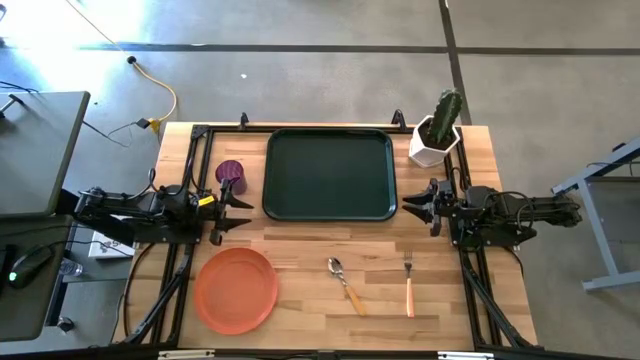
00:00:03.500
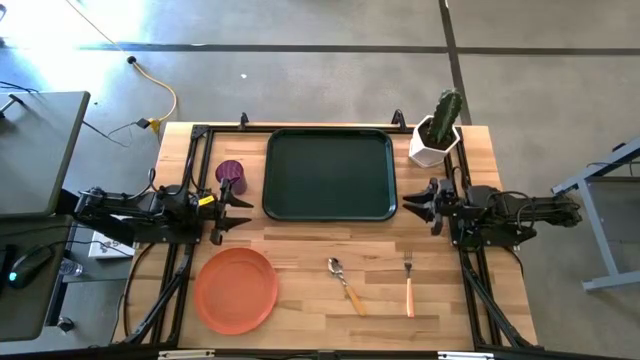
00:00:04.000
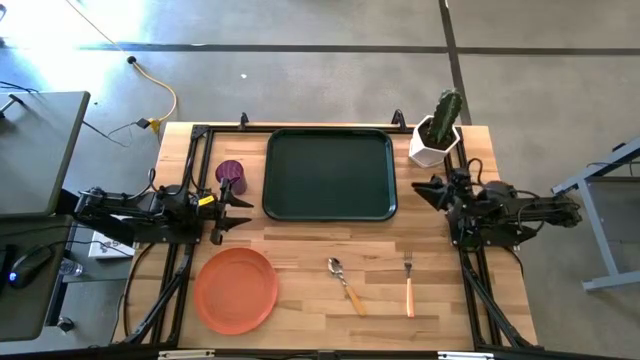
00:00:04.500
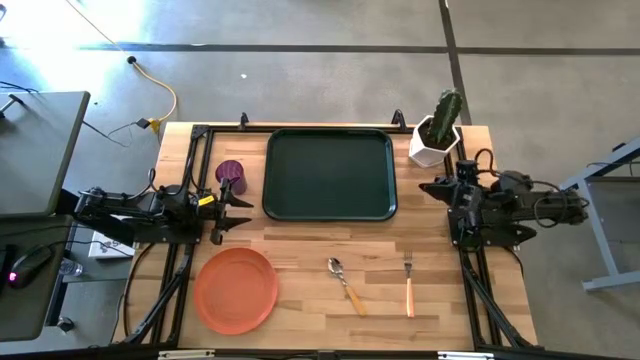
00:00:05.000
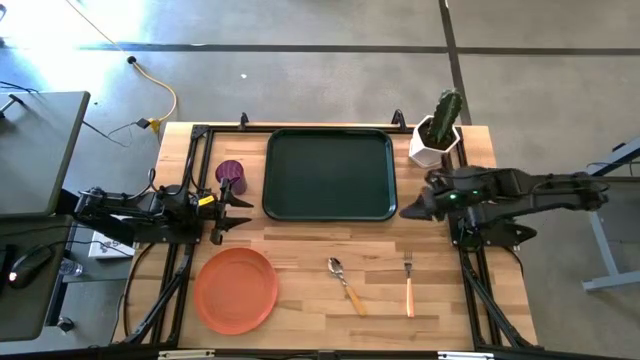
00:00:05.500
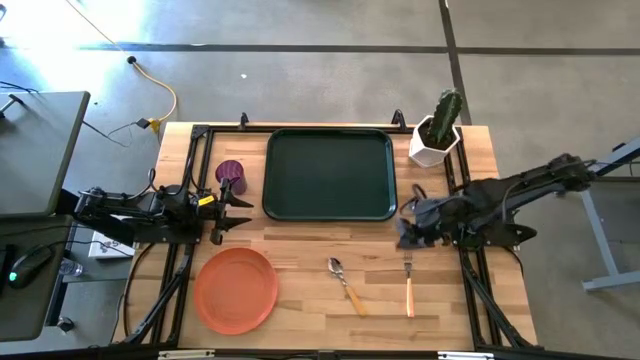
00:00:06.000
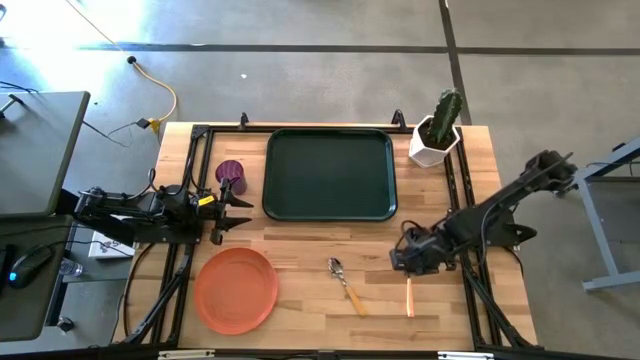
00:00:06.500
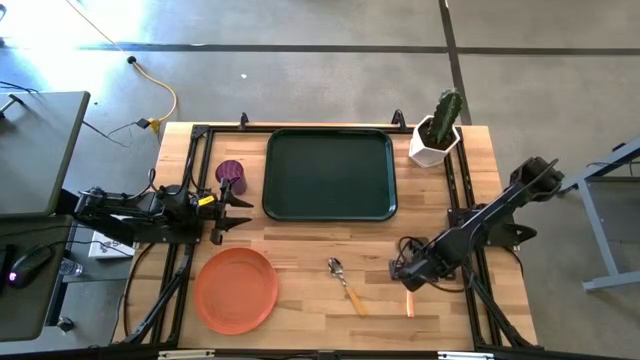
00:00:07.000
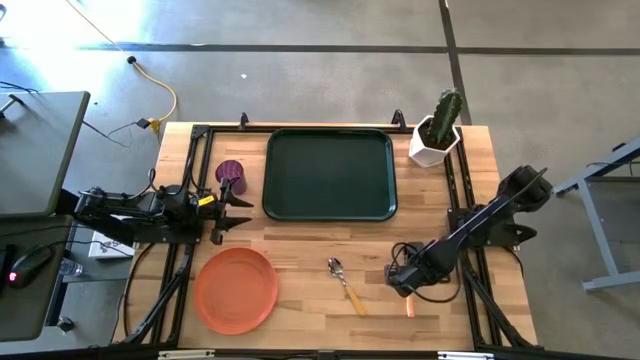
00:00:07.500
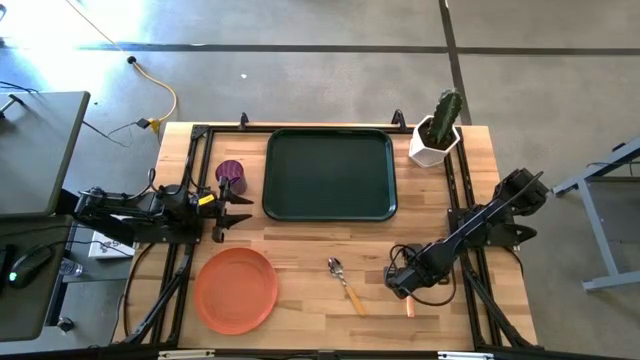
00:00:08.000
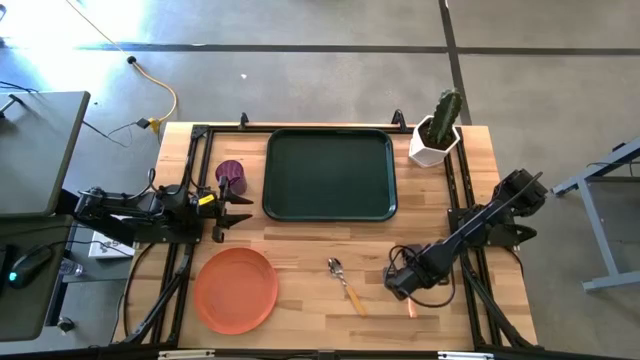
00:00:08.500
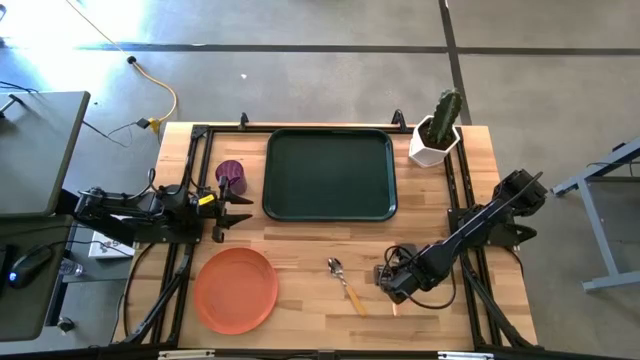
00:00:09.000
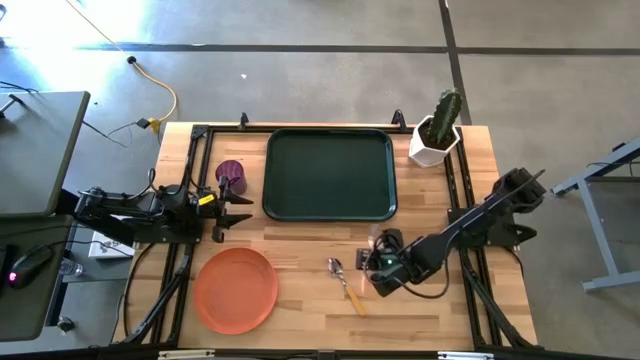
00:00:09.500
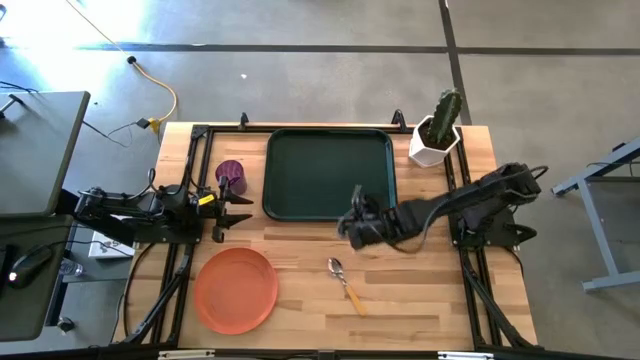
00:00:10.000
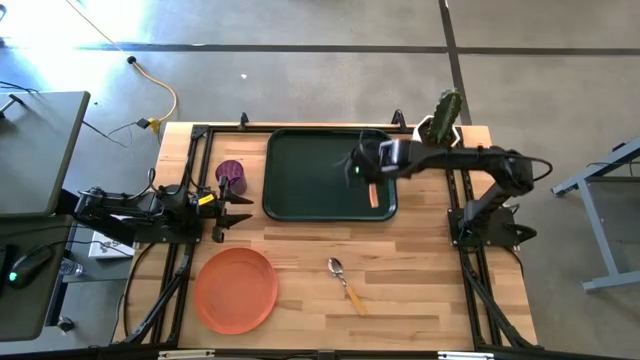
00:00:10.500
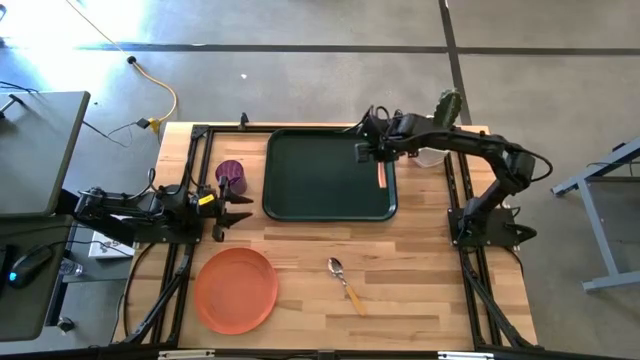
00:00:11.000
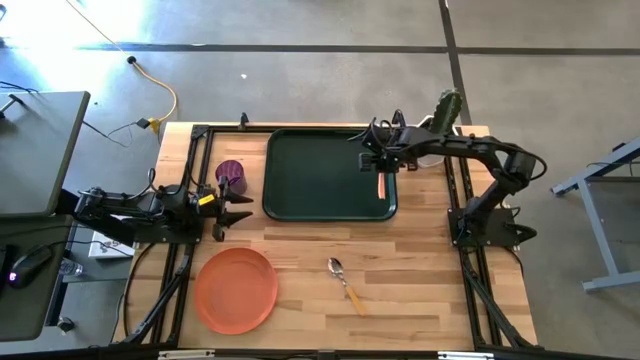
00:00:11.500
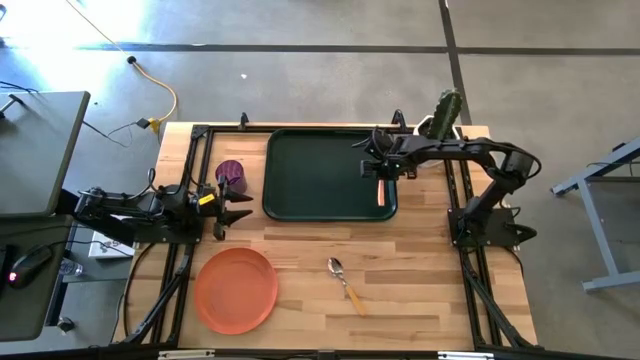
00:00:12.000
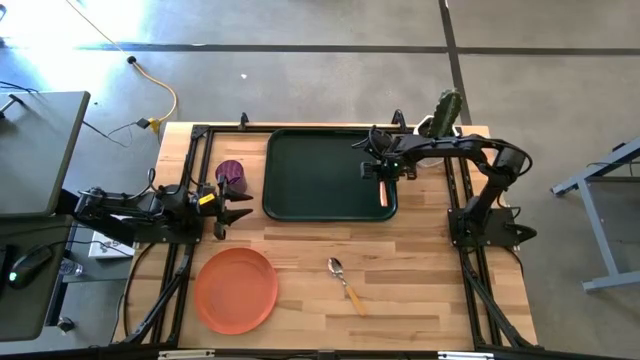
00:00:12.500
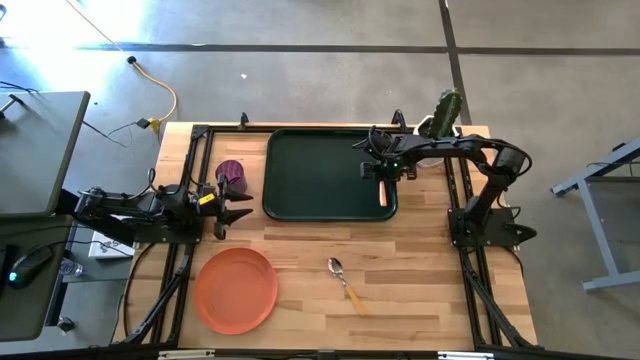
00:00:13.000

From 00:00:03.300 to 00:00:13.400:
Task: Pick and place plate/cup/fork/spoon on tray
Put the orange fork on the serving tray

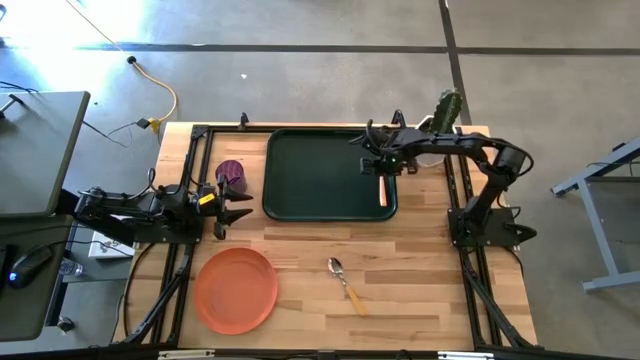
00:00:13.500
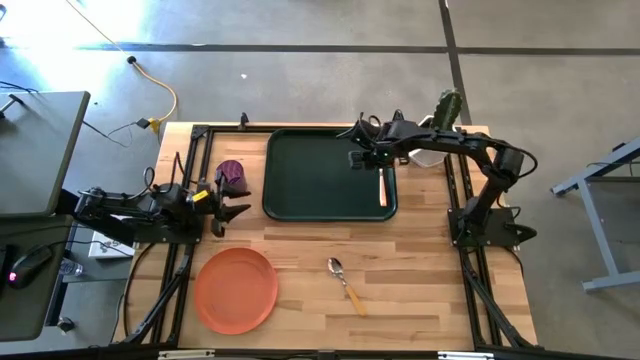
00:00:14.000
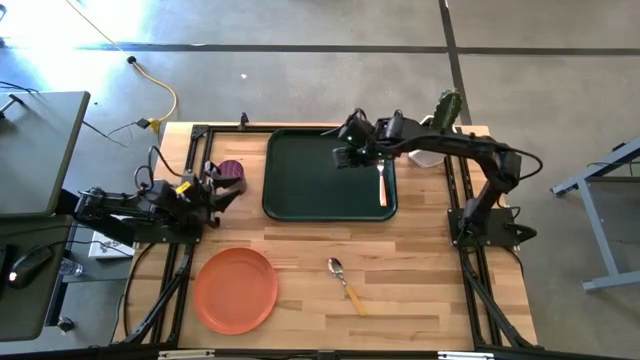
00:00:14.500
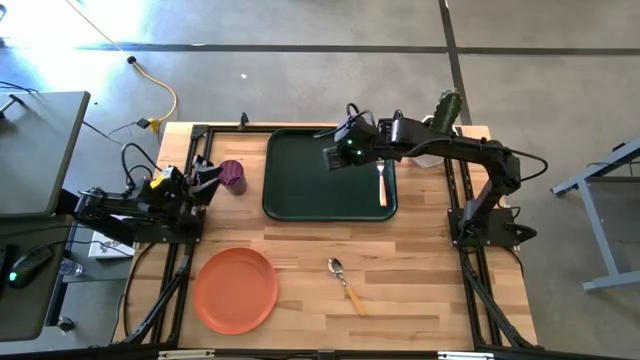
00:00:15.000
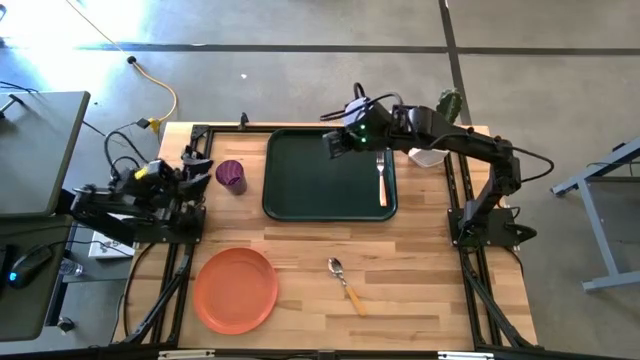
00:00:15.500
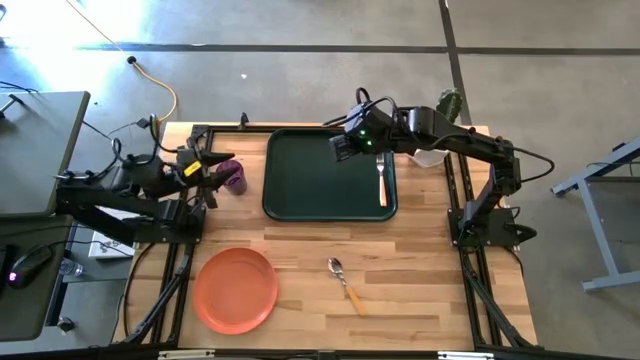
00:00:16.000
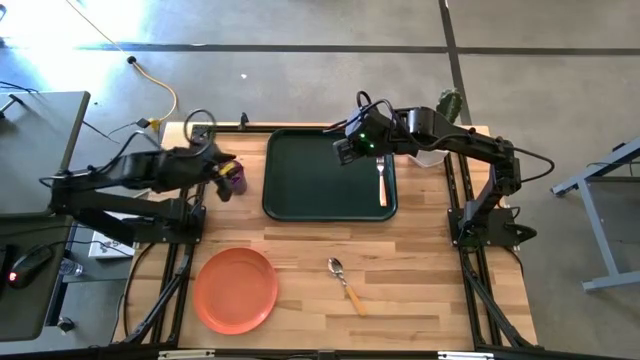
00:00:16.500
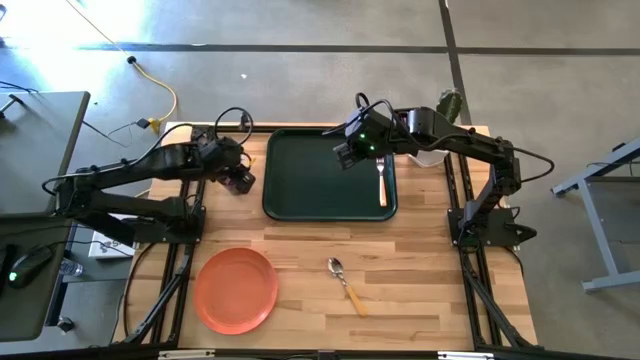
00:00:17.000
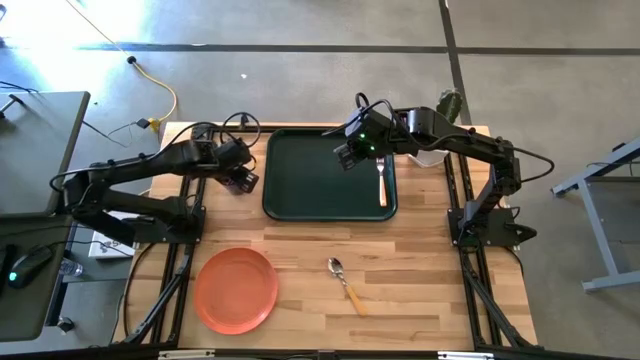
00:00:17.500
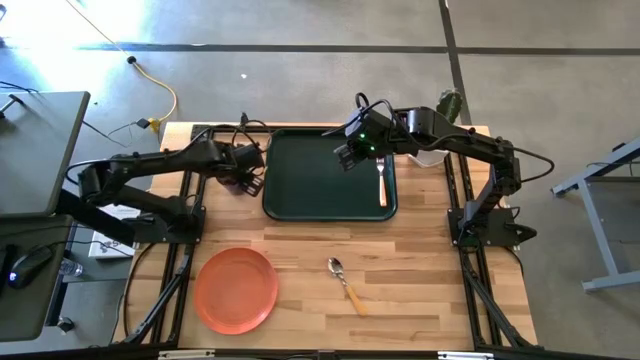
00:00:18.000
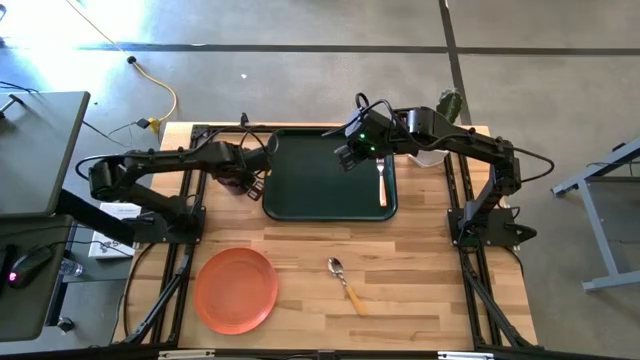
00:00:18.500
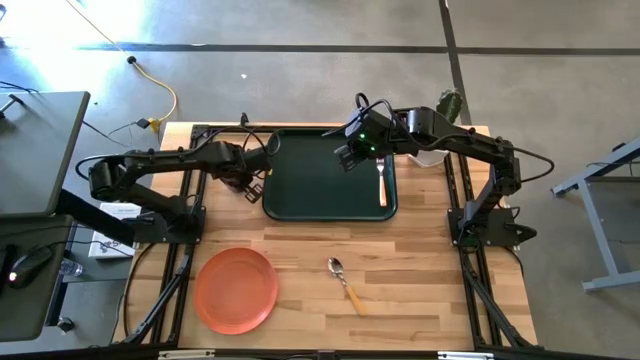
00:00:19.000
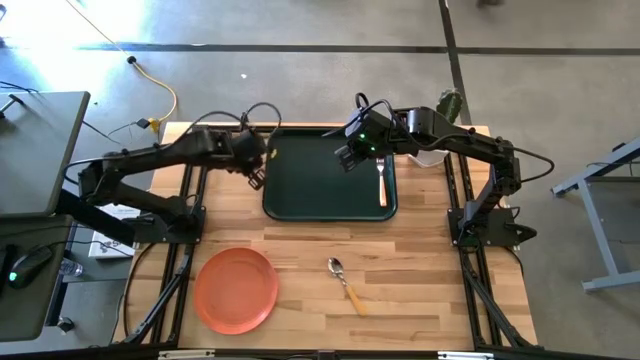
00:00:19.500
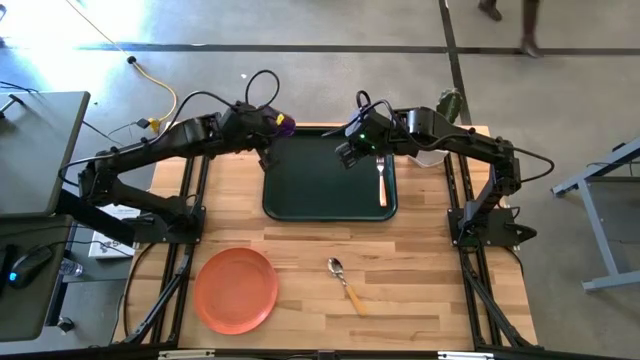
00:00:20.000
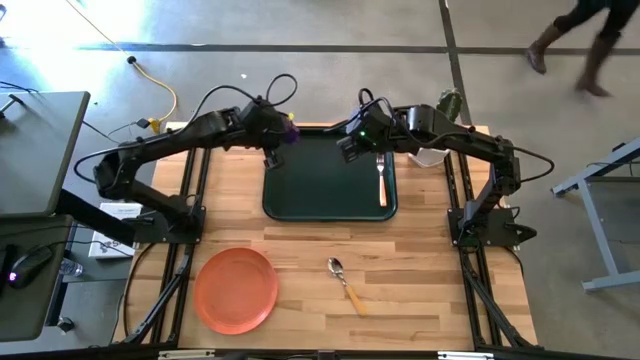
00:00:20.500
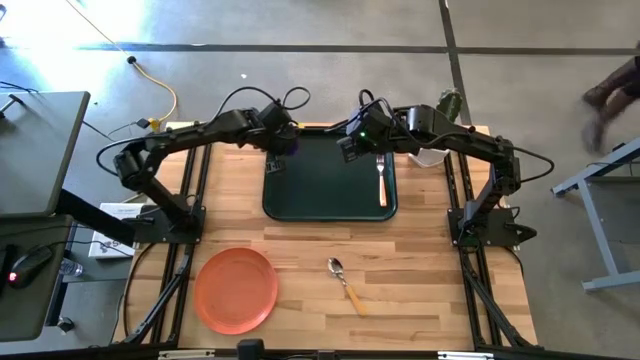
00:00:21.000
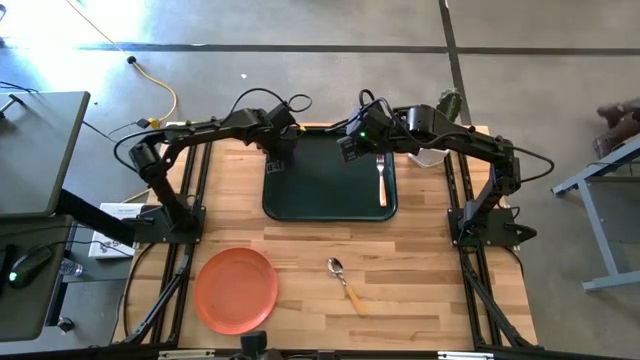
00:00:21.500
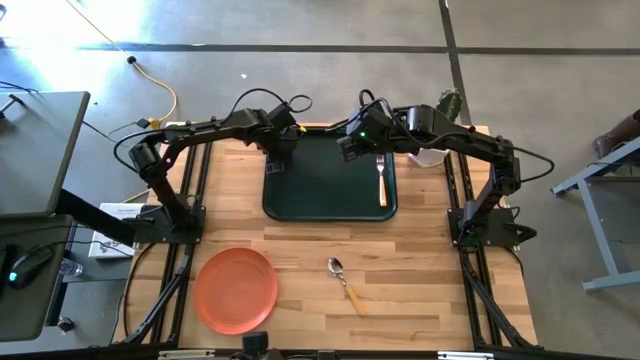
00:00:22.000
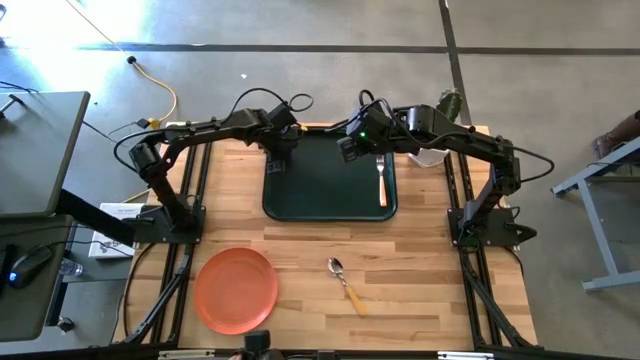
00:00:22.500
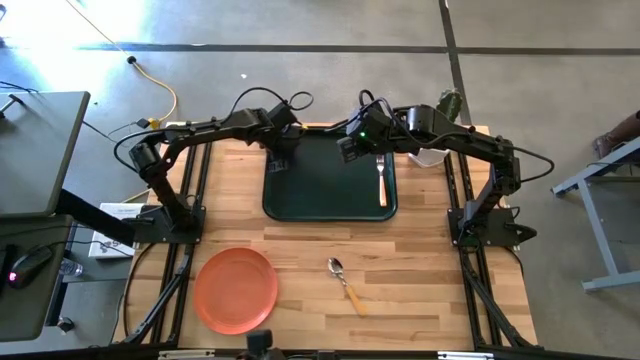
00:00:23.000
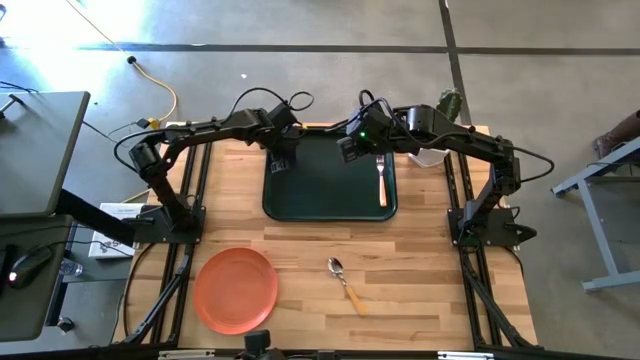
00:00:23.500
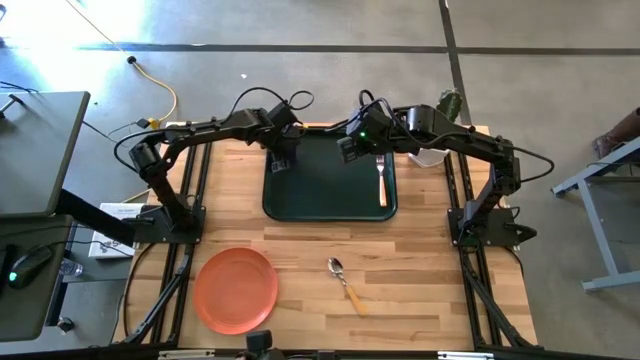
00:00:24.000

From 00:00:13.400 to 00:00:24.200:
Put the purple cup on the serving tray
